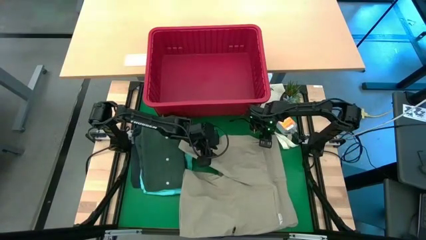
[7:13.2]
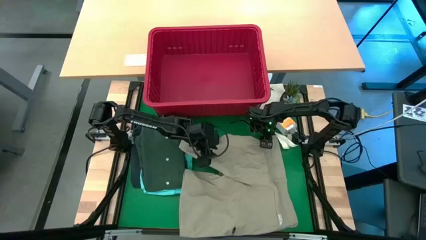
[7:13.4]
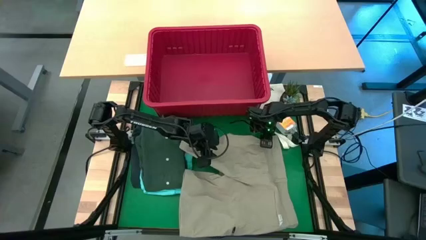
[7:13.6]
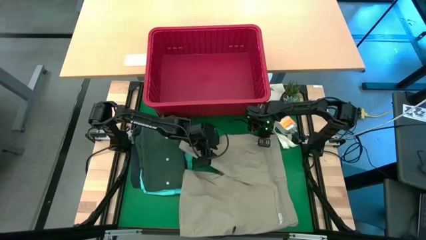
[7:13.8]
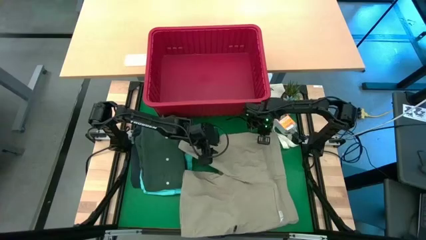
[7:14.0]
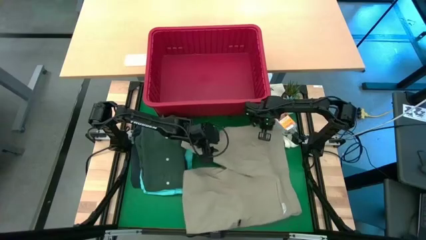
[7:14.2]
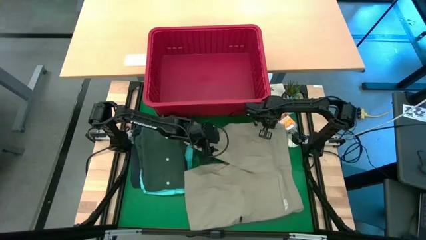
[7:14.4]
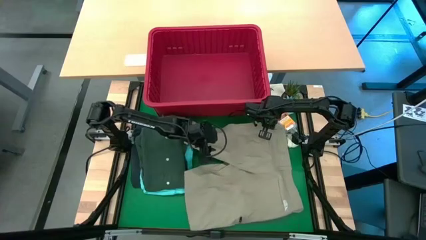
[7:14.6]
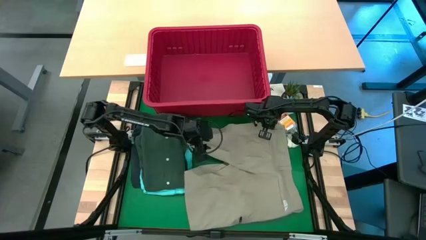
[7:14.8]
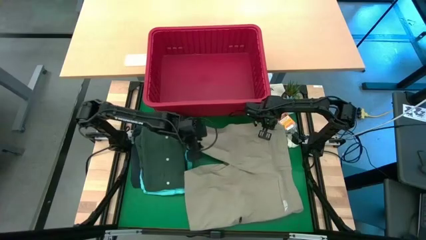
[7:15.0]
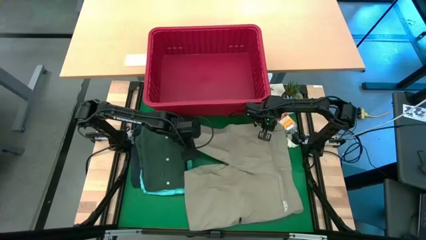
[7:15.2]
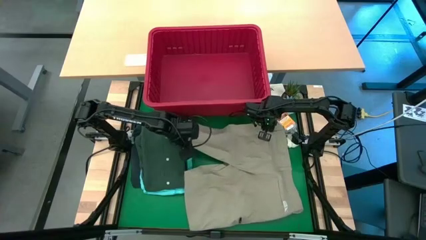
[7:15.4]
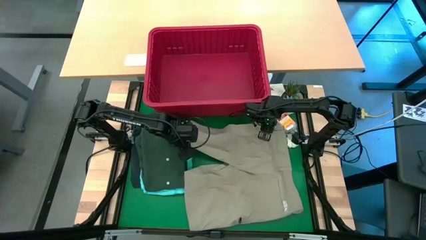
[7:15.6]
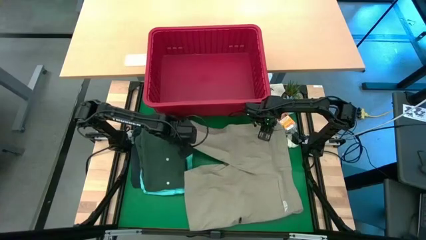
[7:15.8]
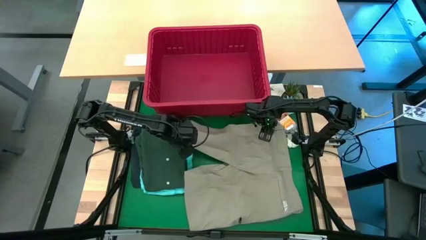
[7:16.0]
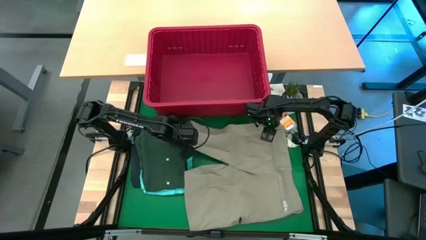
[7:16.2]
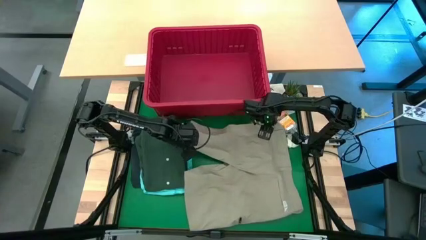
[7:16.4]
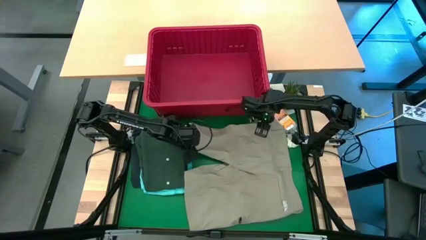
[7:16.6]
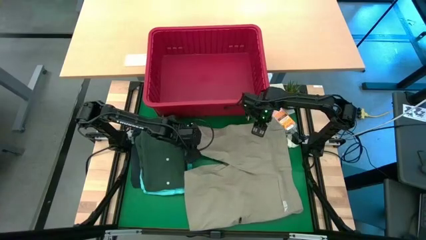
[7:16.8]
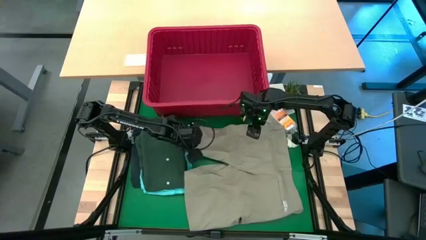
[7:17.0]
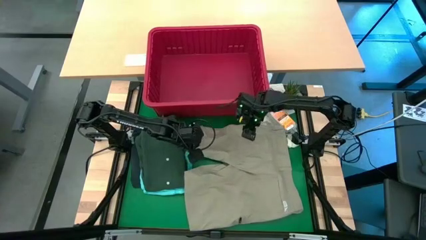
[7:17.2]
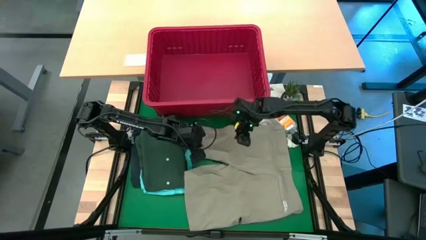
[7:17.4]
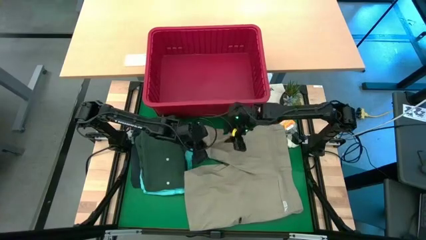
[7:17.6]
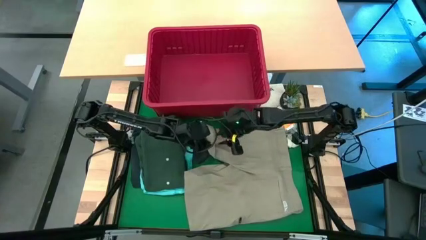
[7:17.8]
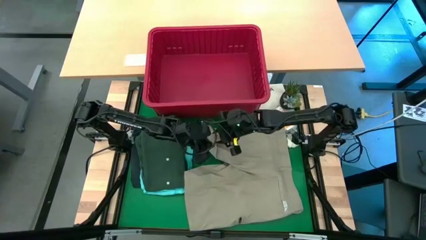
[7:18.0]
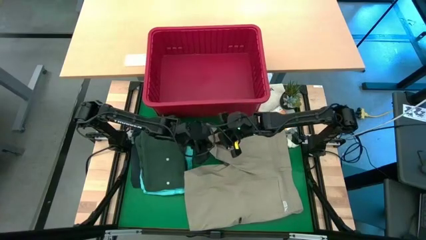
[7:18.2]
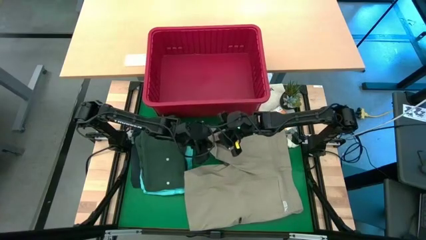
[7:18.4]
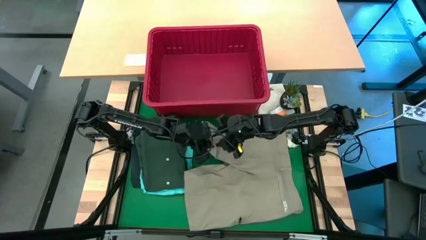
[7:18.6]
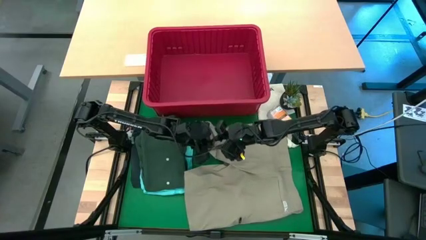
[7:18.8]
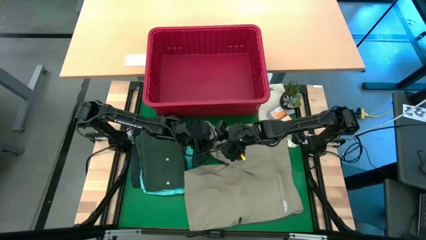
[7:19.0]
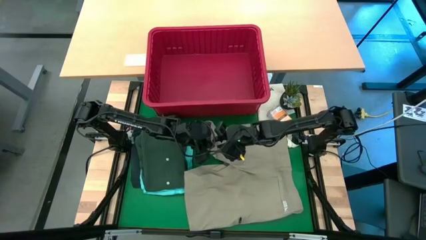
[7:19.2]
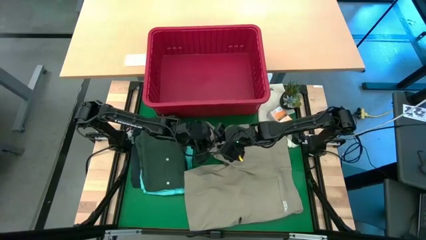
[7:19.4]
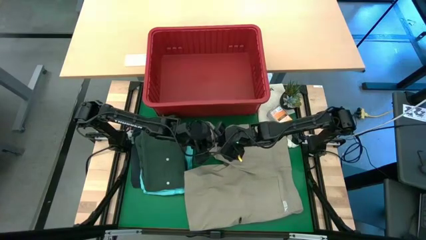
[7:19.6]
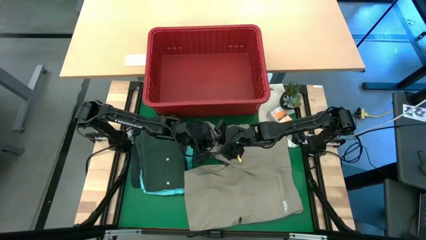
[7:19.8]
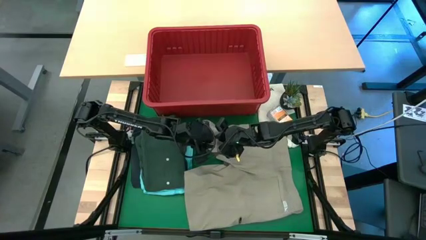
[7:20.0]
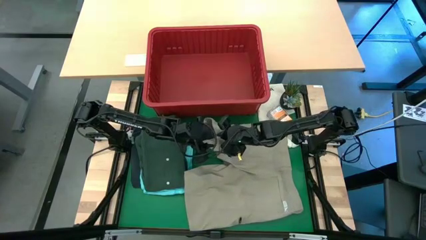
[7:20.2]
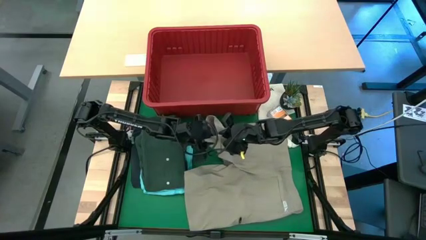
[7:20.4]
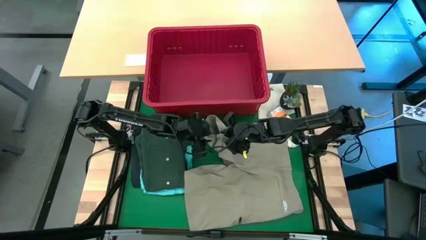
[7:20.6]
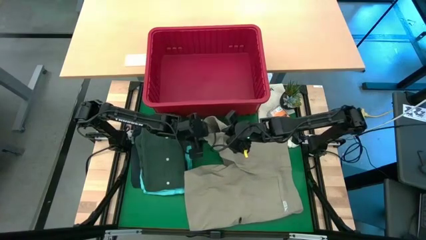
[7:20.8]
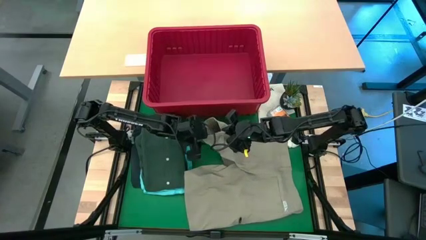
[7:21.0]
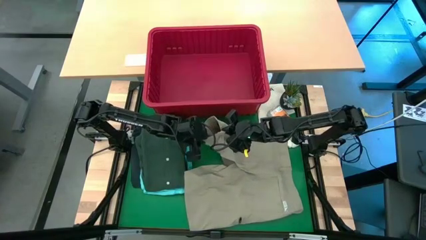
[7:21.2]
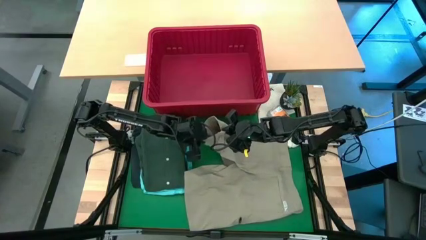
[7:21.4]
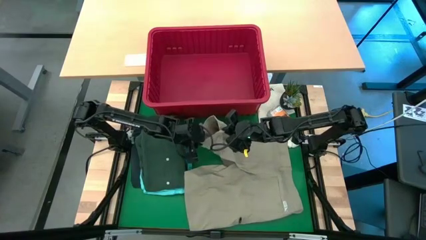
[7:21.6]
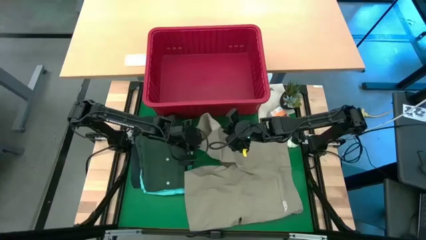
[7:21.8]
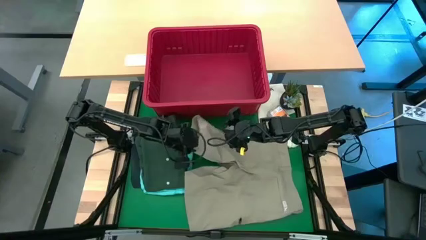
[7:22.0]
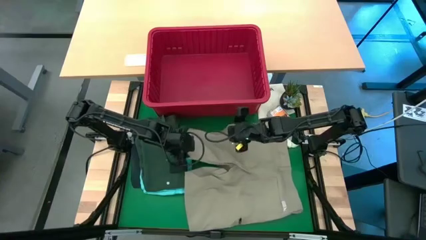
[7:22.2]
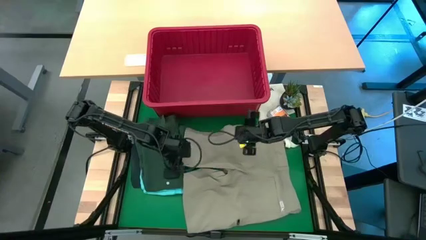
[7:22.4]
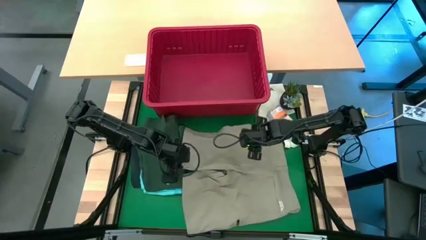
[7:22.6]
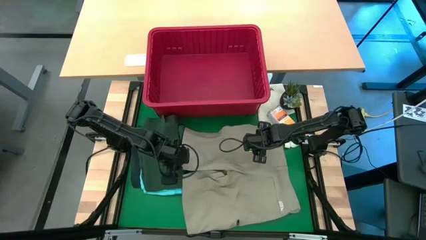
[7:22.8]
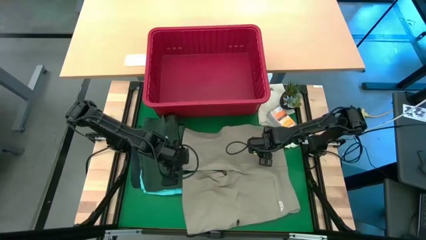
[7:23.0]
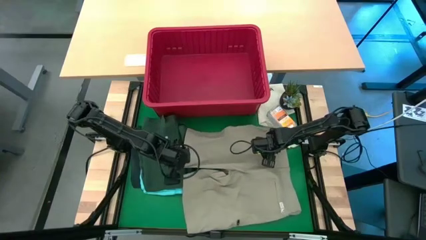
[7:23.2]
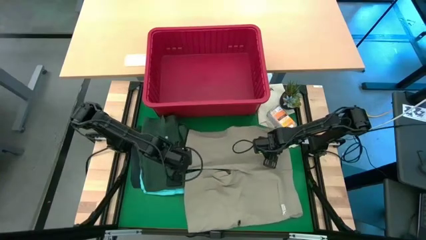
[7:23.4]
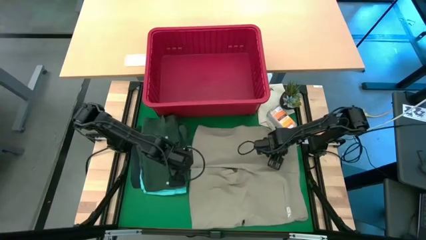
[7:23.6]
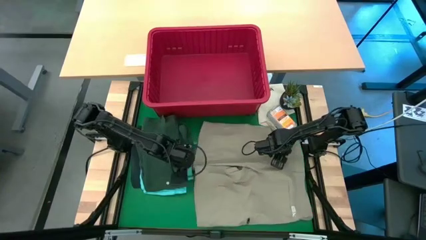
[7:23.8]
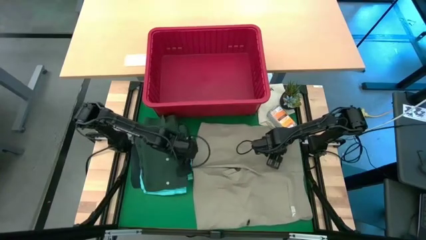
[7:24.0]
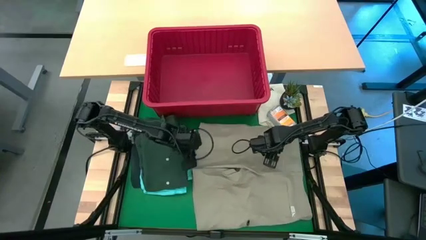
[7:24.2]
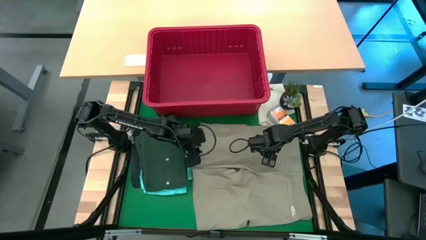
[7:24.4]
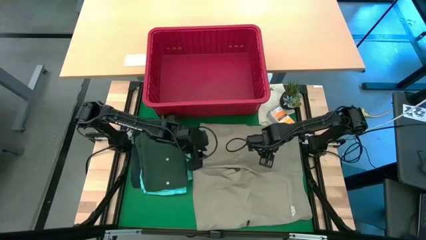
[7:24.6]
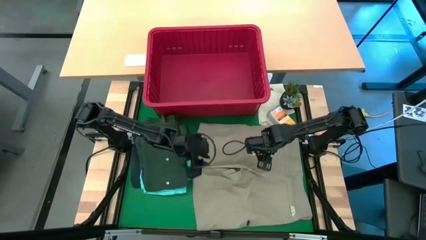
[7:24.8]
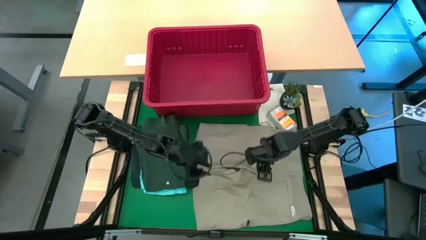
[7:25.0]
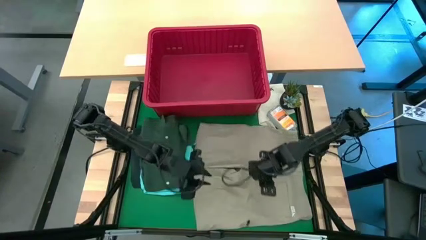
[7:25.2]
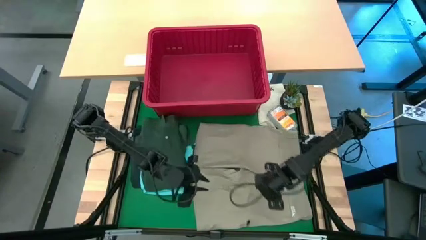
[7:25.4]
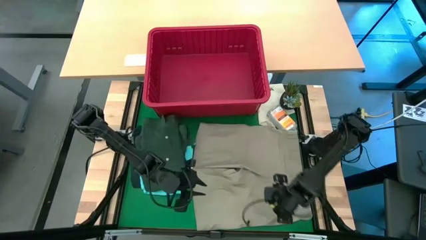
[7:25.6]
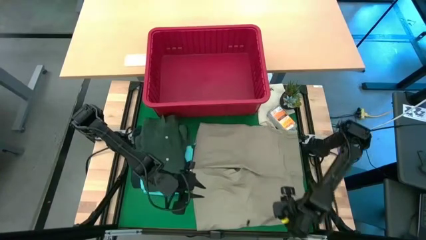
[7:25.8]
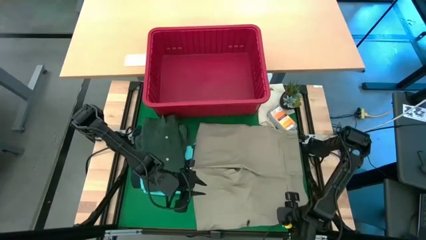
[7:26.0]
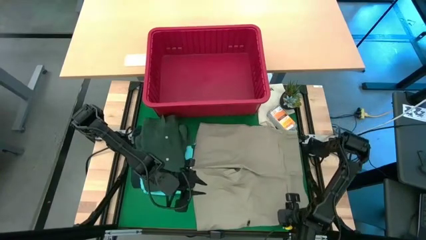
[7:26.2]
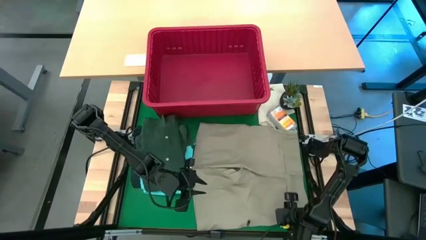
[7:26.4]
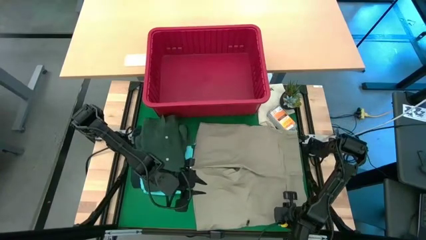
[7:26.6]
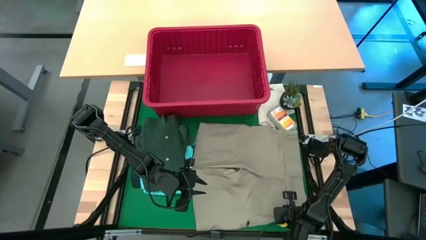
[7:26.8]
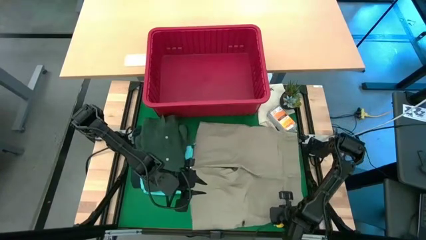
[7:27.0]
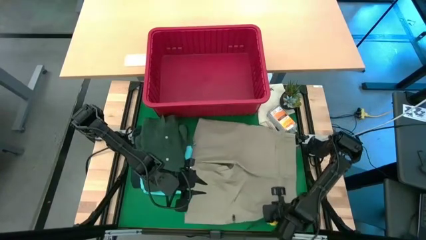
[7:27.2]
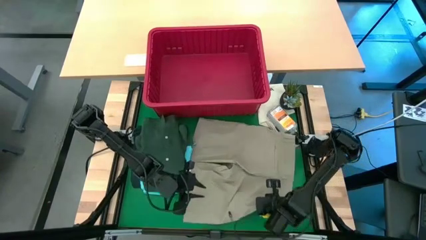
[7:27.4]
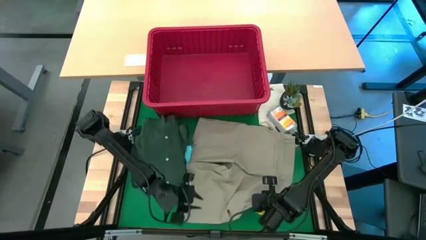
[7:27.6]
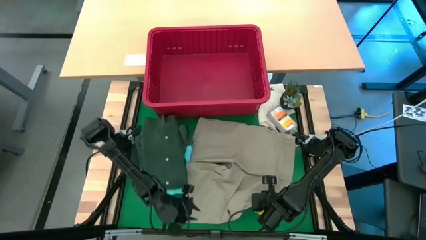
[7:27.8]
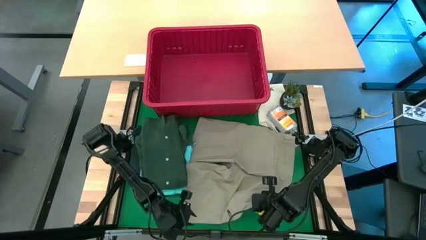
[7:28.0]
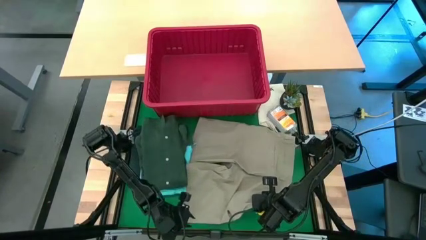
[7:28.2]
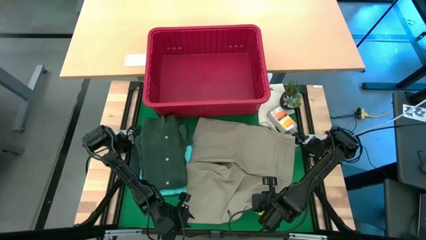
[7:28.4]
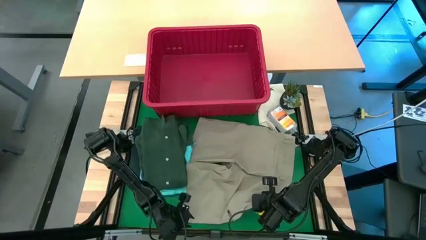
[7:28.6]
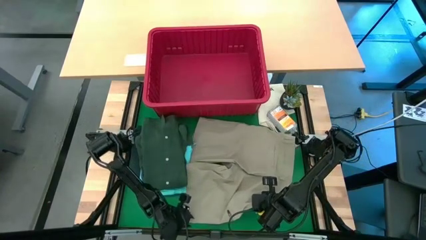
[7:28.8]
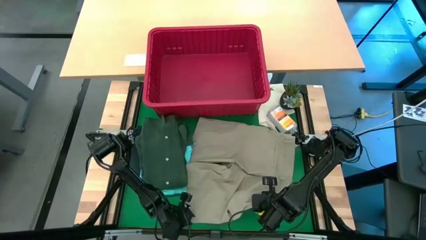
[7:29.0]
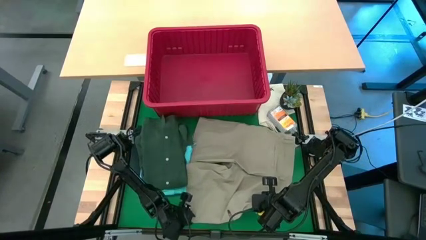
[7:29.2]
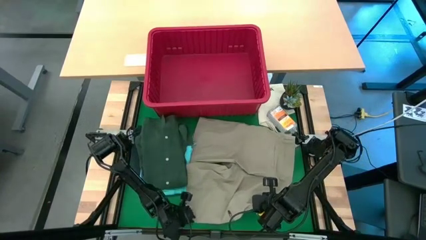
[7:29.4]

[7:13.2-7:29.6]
Task: Fold Laundry from Bin
Fold the brown shorts from the red laundry bin
